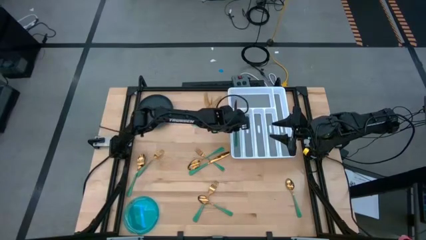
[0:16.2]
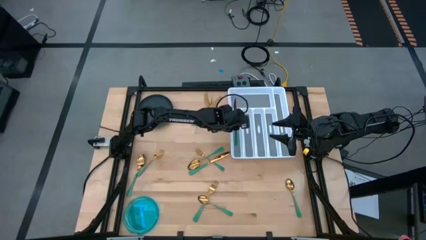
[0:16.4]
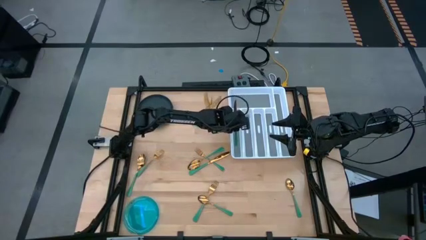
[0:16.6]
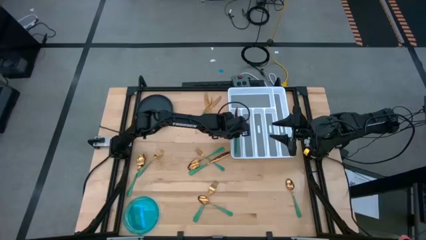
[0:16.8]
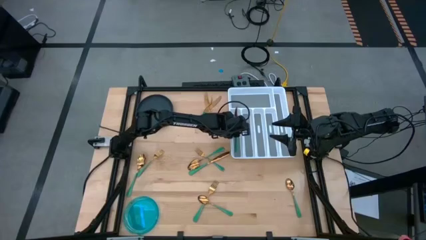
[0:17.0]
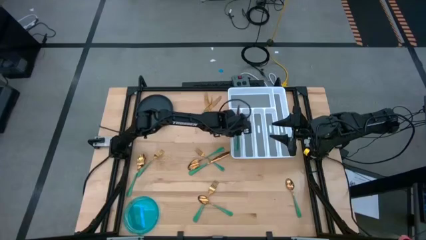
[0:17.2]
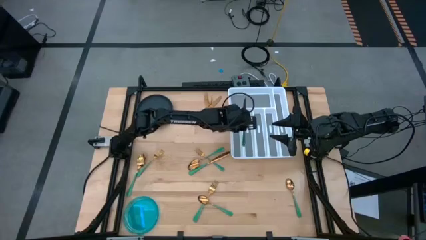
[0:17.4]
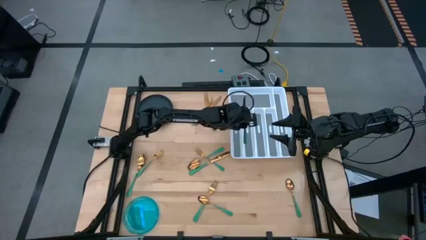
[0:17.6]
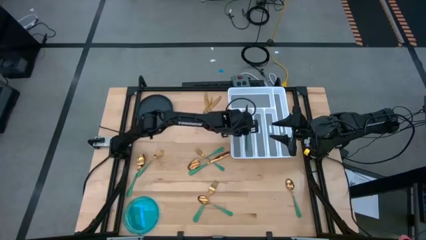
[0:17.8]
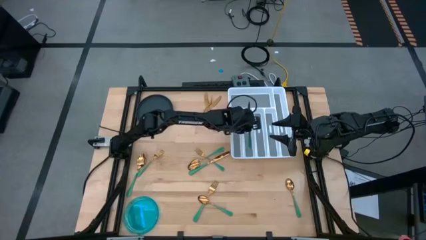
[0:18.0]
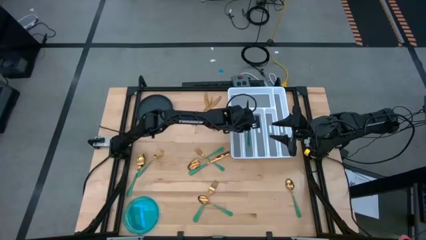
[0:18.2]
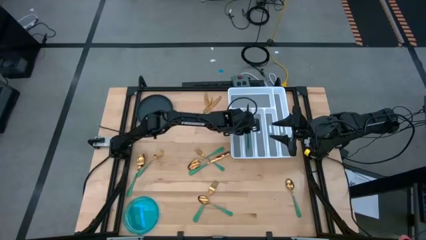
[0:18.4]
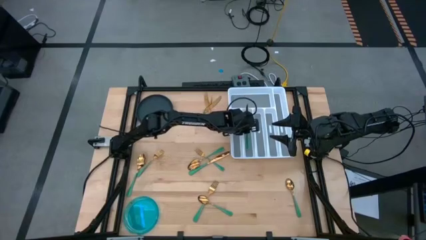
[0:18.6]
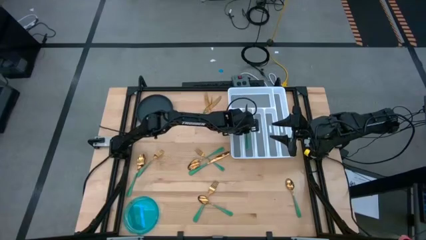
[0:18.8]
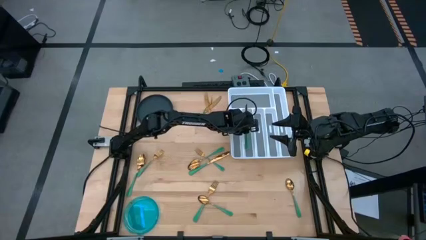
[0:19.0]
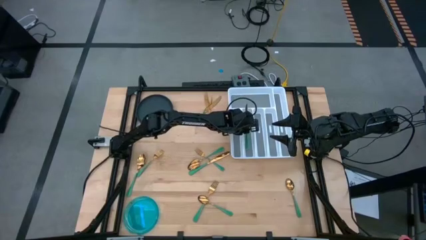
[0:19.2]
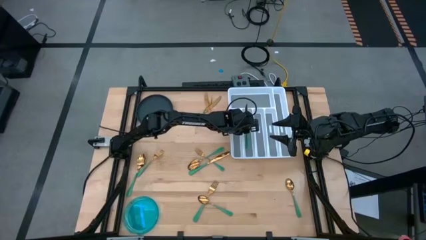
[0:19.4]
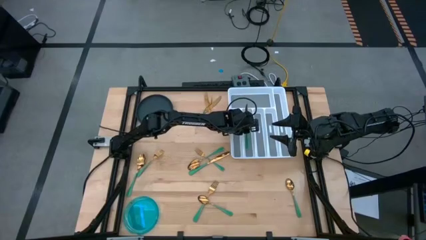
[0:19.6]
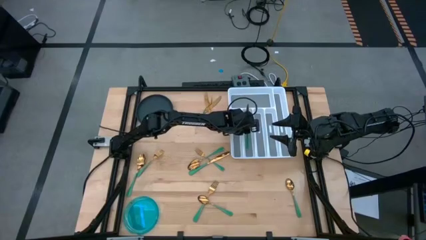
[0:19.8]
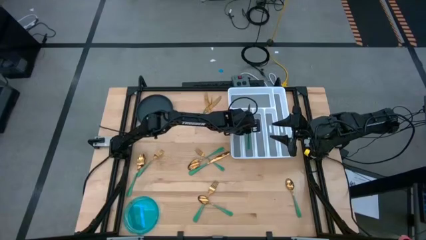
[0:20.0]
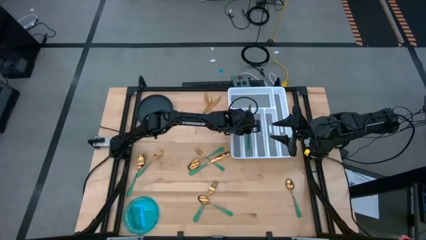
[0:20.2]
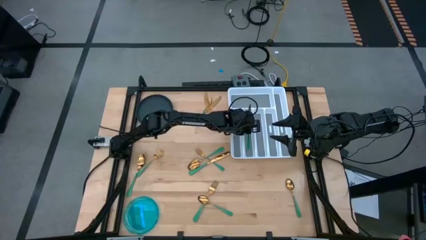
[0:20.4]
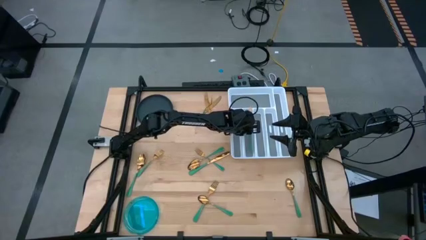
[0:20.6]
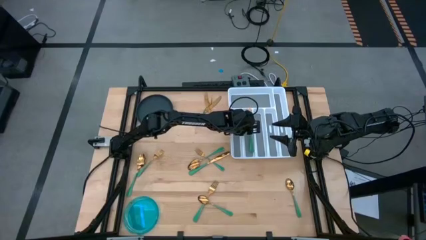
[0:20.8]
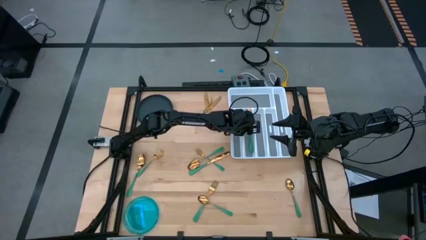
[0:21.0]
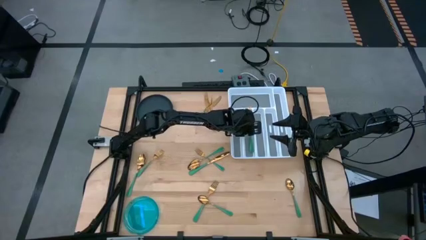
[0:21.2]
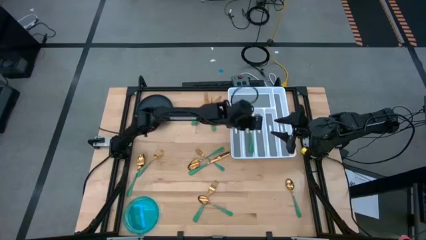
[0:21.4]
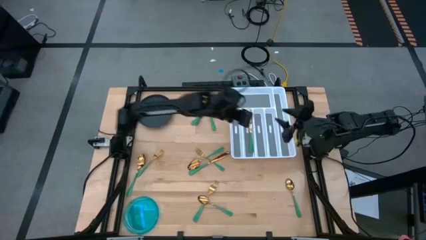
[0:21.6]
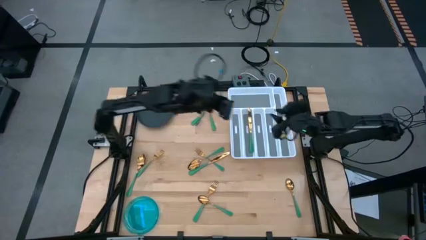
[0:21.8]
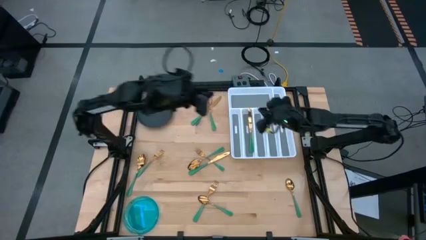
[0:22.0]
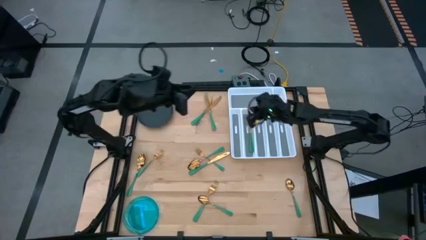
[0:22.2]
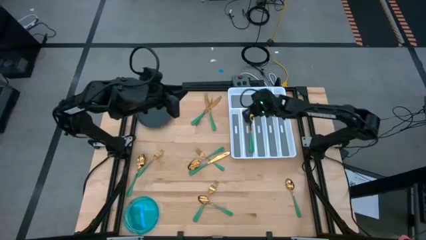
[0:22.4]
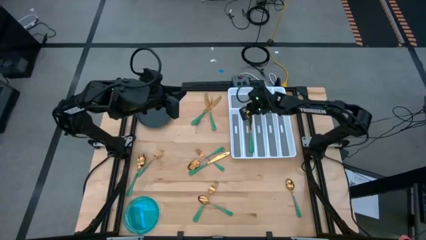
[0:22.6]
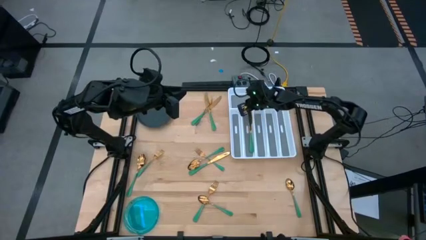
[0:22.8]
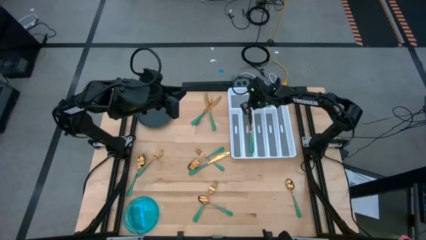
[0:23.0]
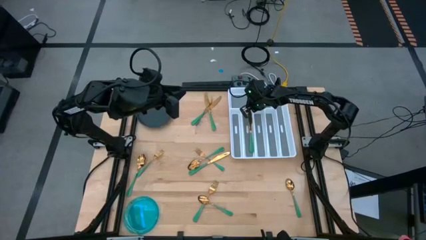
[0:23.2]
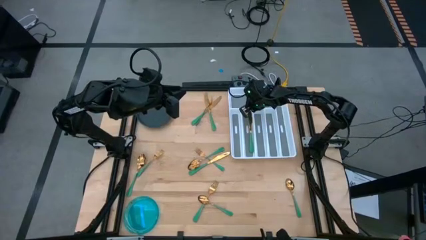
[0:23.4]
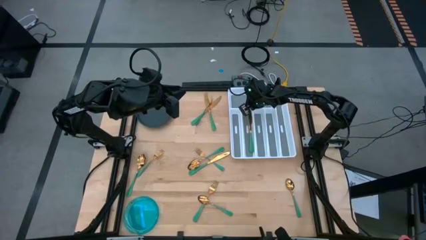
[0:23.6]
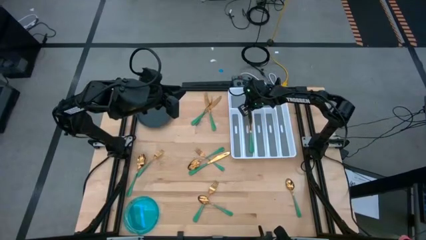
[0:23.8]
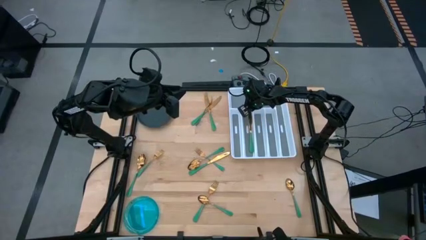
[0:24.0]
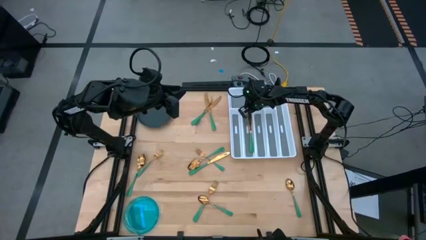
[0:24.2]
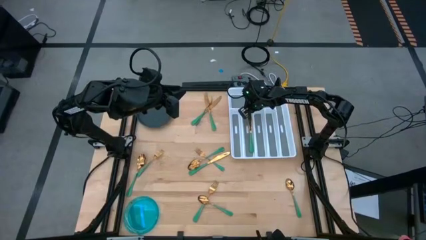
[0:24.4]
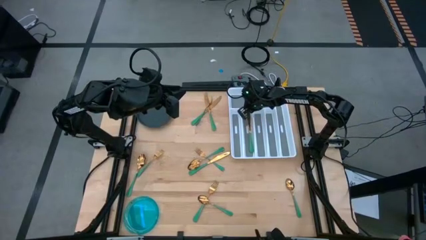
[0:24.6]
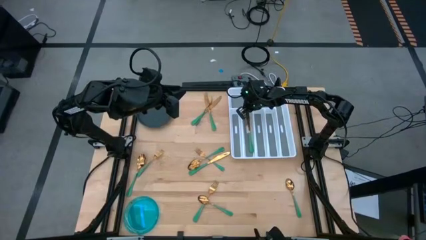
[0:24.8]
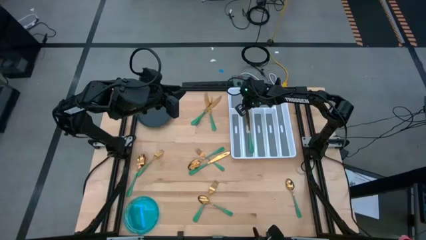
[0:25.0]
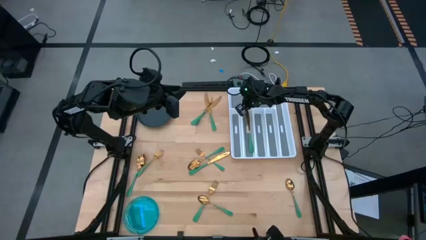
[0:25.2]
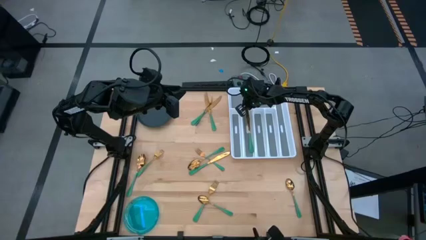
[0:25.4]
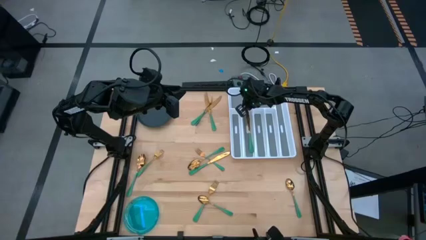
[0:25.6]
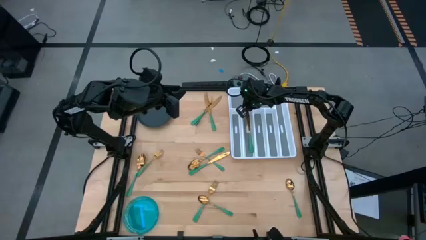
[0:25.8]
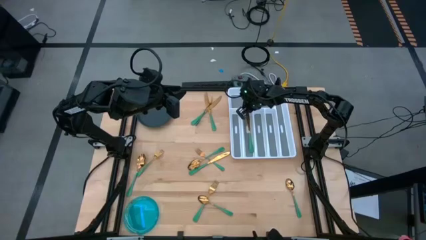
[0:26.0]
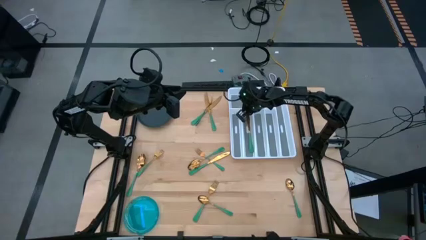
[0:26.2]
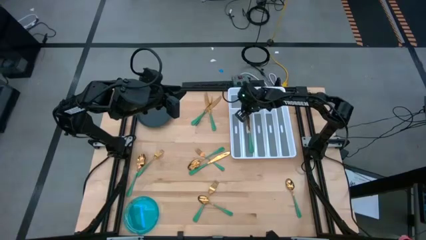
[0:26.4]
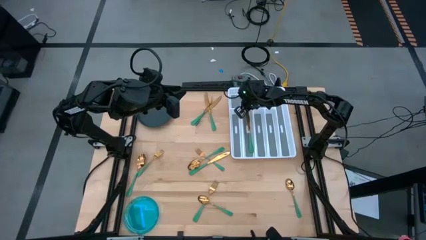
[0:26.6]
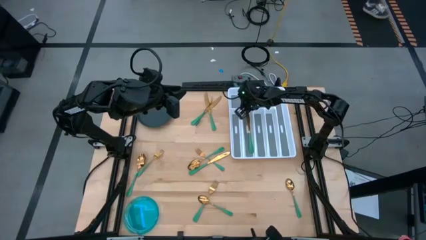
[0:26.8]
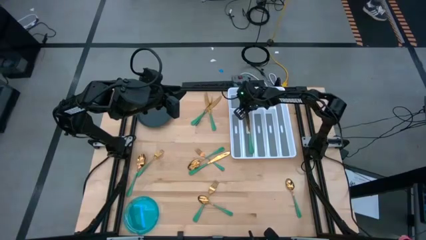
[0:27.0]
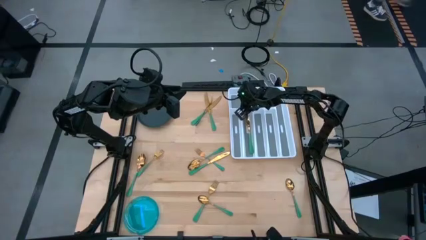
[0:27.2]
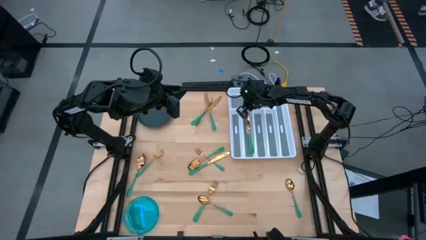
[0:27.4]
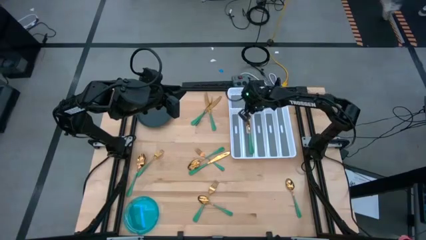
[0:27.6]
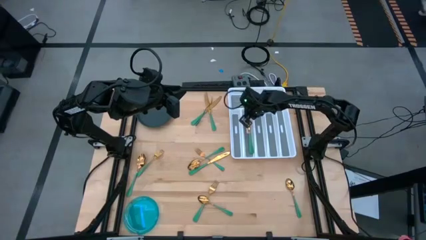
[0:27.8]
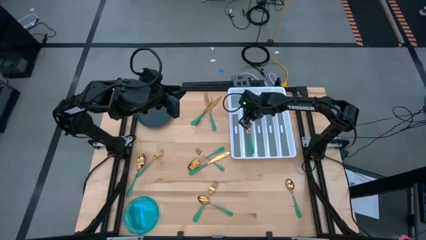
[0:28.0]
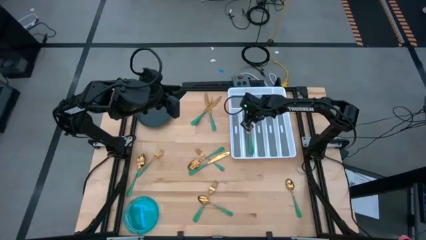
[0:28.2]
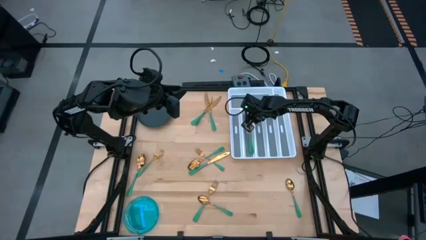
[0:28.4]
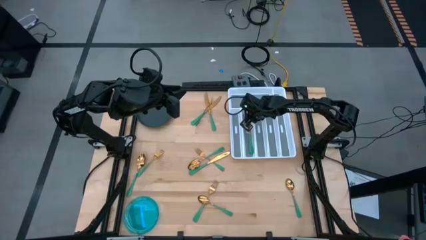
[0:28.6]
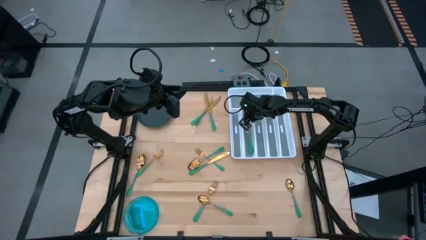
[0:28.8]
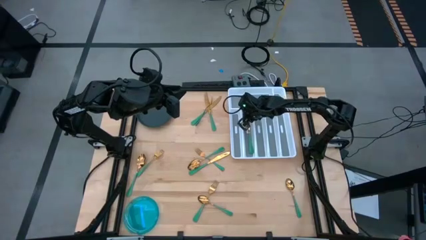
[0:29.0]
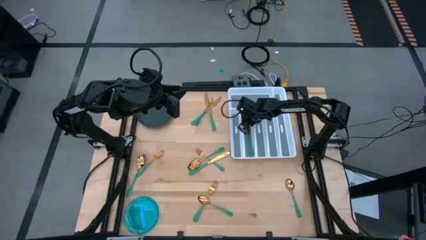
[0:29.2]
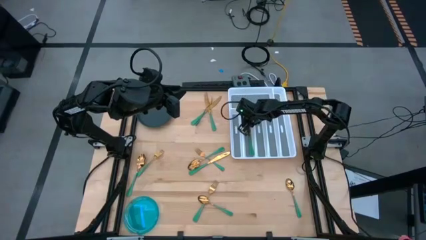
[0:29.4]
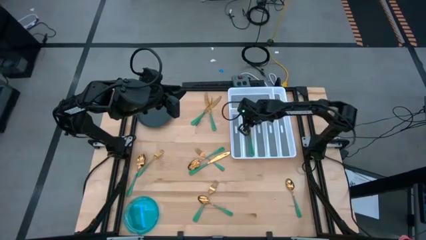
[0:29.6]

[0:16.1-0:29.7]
Task: Sort silverware
Put the green knife on the silverware organizer

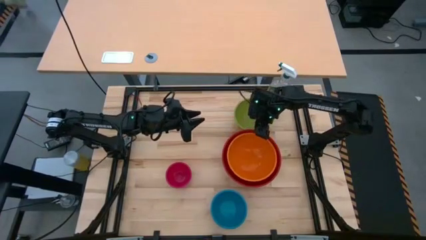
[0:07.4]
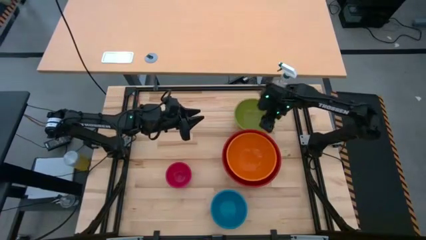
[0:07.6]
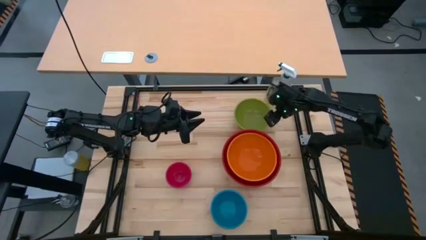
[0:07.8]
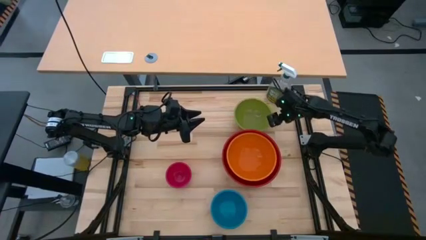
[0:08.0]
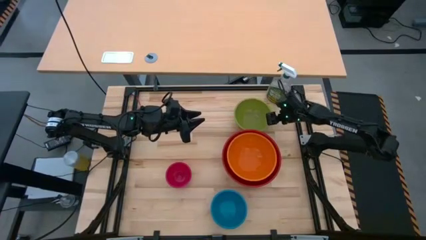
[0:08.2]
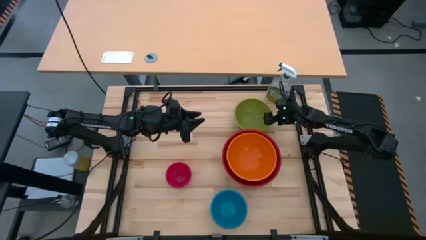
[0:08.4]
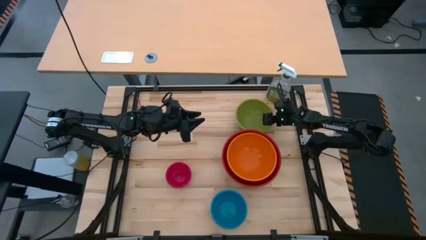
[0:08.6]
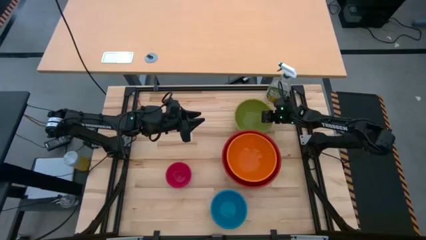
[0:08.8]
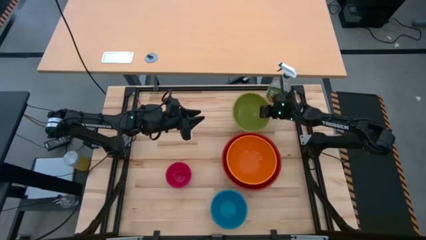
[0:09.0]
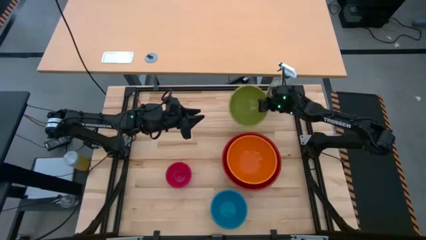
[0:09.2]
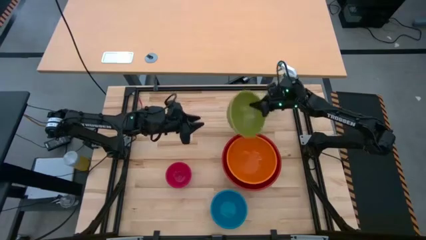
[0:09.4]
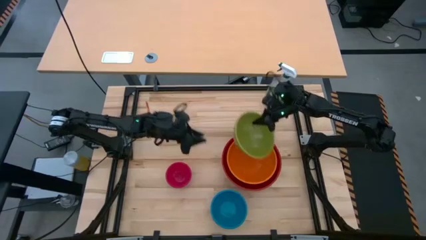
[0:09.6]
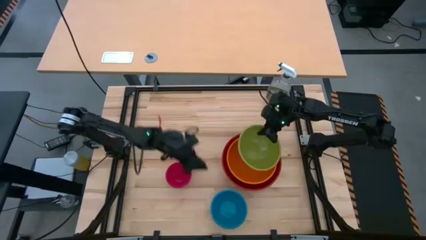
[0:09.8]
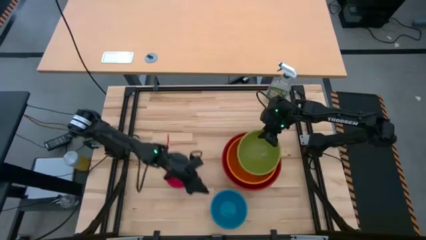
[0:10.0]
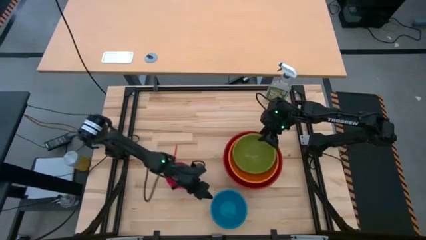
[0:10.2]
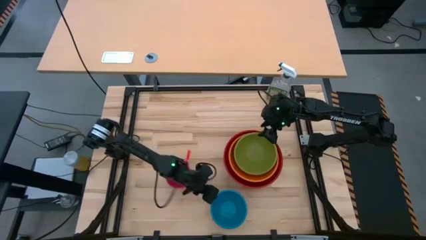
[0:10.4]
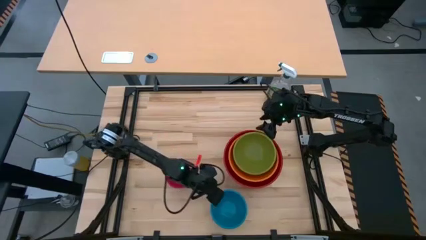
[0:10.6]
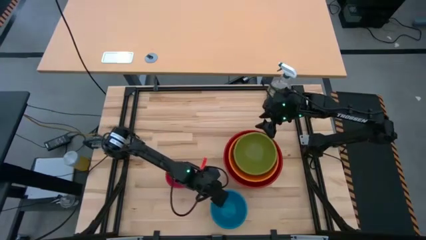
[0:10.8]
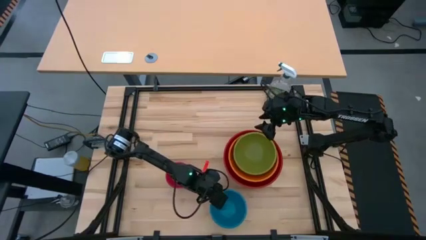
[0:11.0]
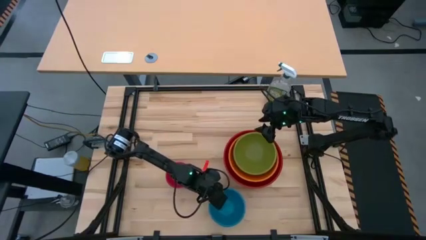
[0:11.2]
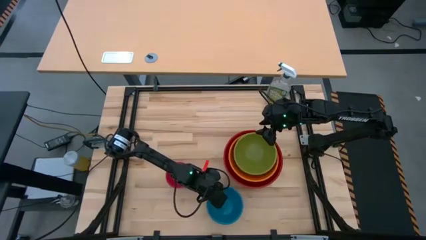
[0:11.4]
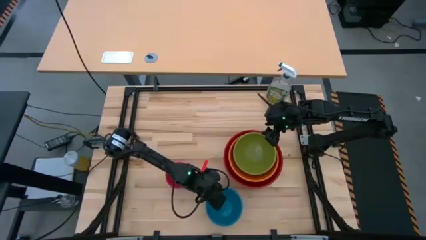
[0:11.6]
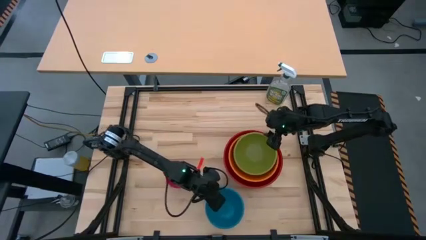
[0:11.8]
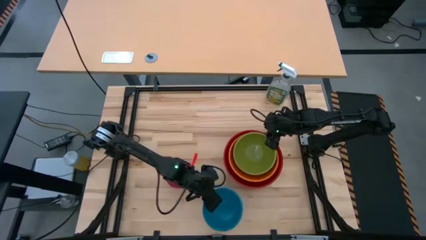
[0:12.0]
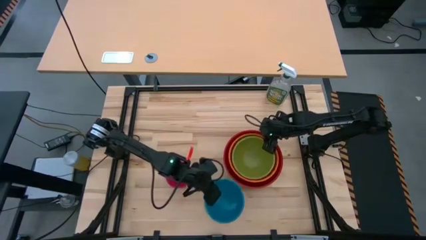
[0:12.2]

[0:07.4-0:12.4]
Task: Nest bowls inside each other by size order
Stack the green bowl on top of the orange bowl
